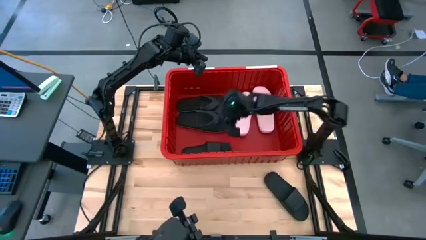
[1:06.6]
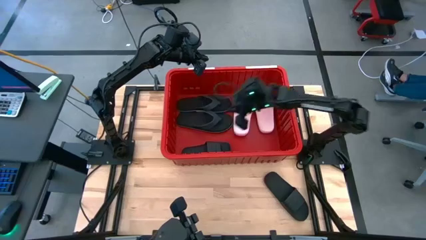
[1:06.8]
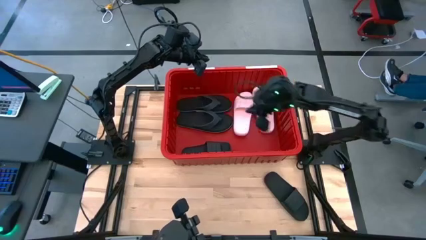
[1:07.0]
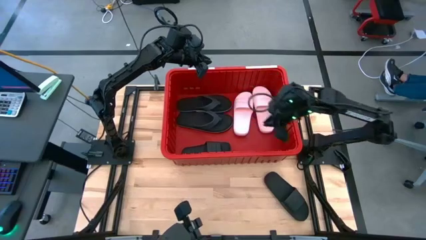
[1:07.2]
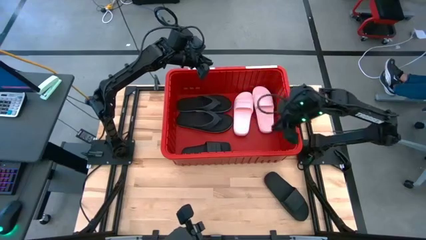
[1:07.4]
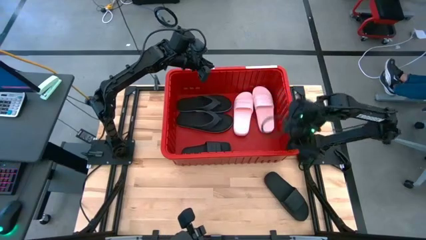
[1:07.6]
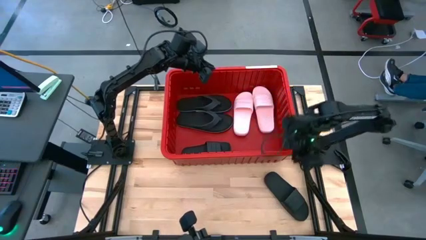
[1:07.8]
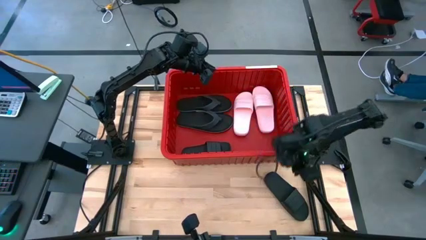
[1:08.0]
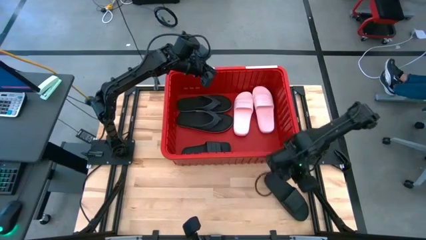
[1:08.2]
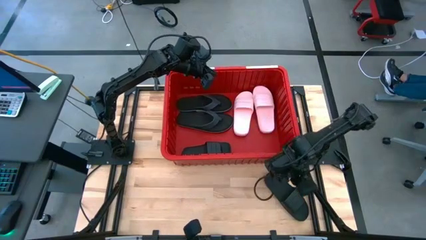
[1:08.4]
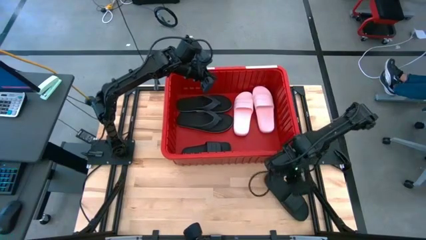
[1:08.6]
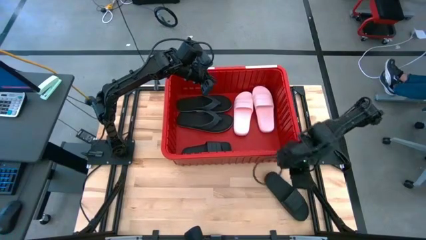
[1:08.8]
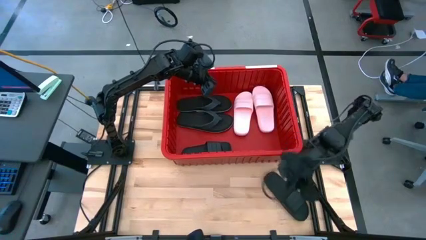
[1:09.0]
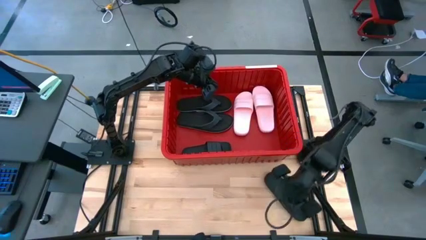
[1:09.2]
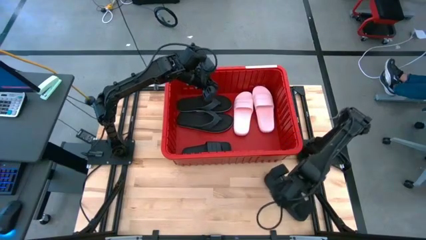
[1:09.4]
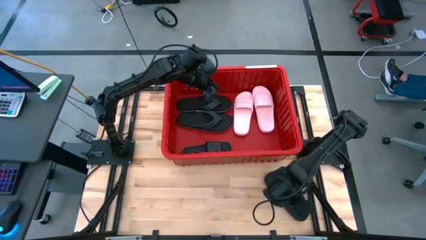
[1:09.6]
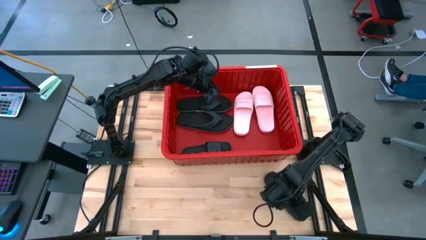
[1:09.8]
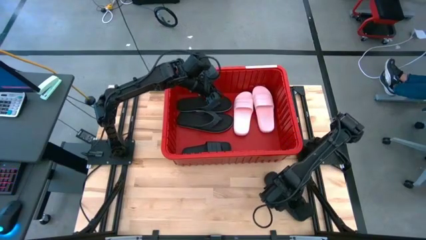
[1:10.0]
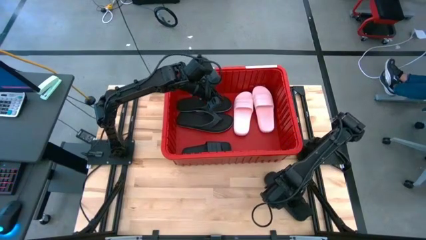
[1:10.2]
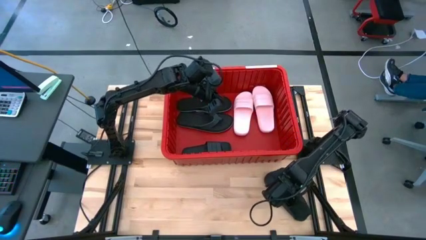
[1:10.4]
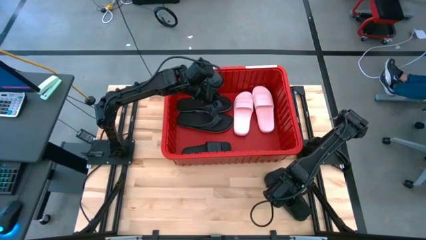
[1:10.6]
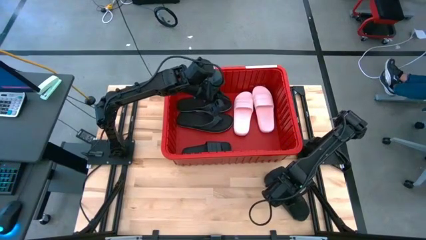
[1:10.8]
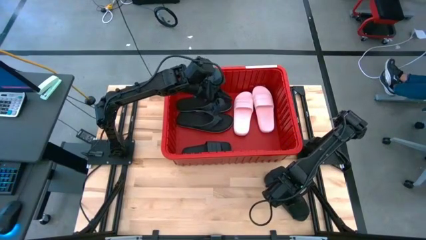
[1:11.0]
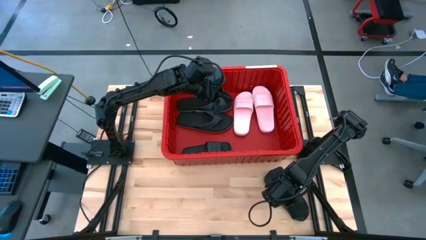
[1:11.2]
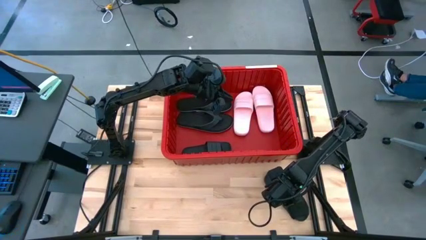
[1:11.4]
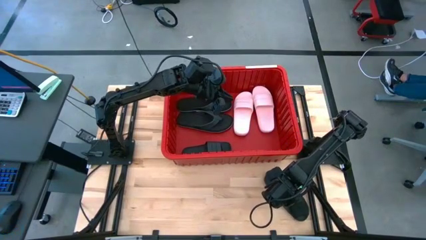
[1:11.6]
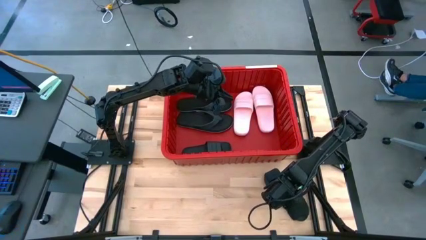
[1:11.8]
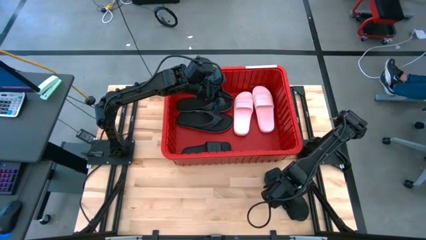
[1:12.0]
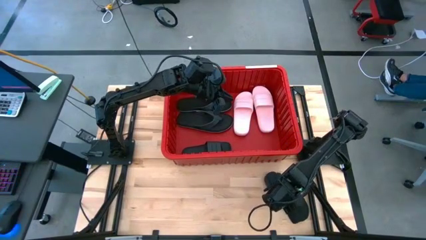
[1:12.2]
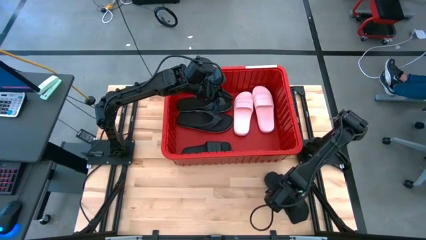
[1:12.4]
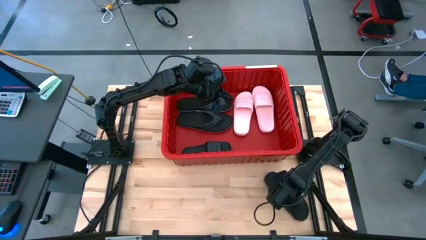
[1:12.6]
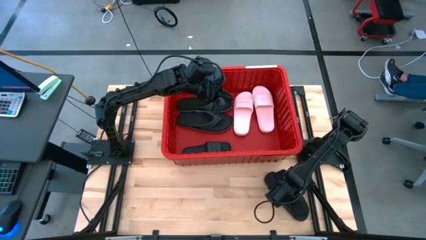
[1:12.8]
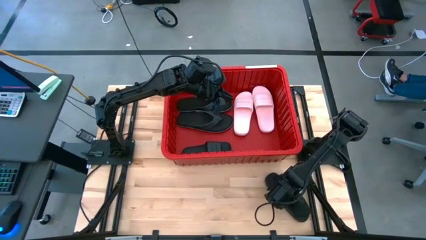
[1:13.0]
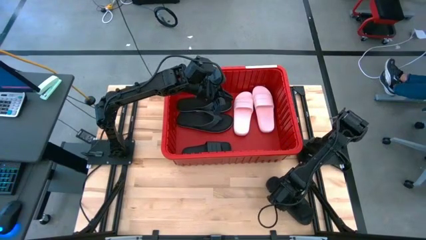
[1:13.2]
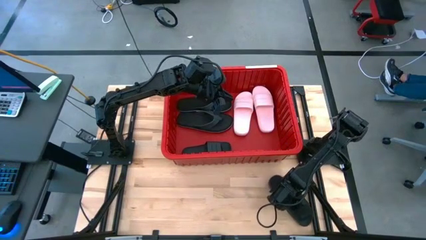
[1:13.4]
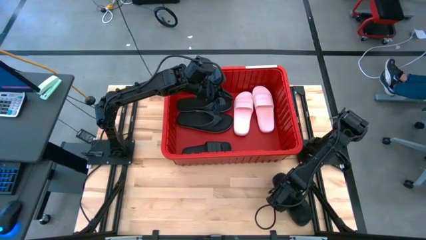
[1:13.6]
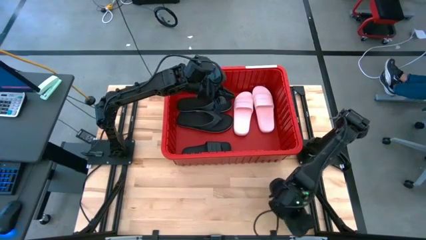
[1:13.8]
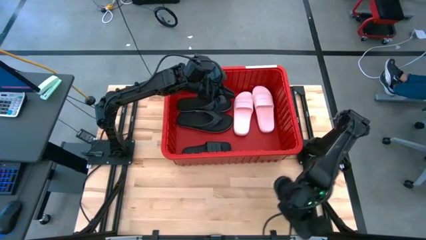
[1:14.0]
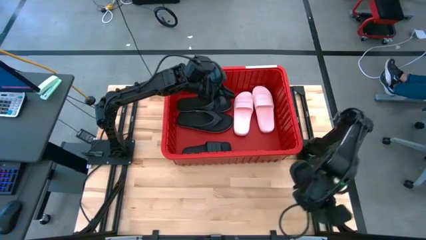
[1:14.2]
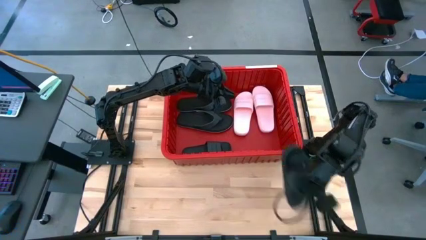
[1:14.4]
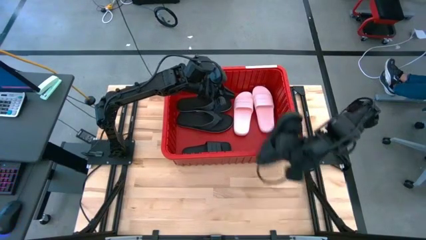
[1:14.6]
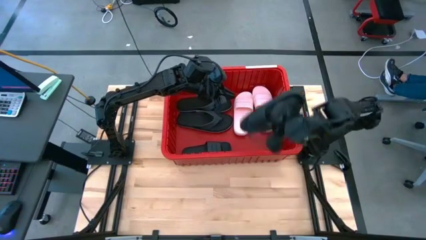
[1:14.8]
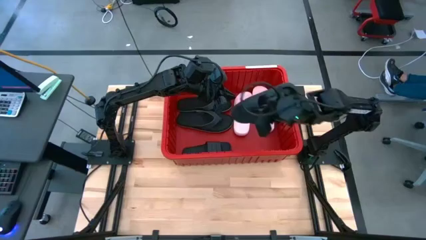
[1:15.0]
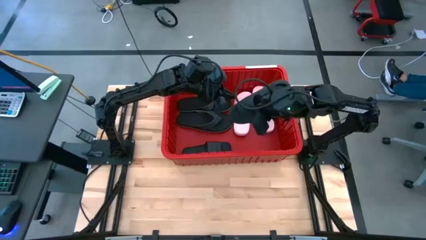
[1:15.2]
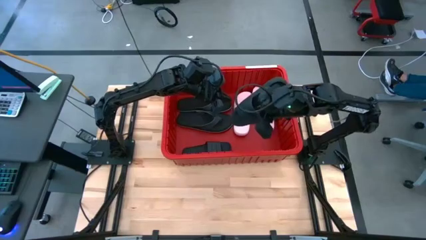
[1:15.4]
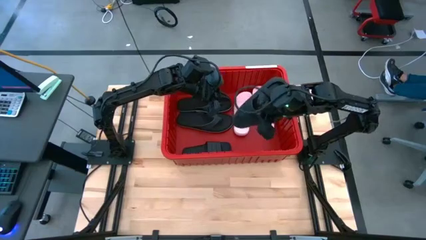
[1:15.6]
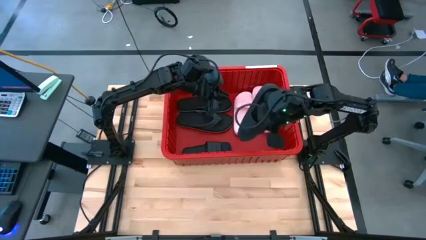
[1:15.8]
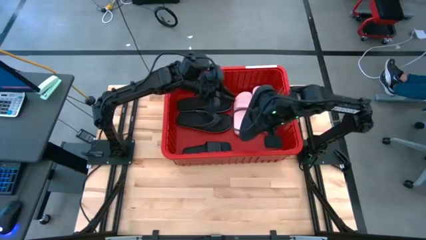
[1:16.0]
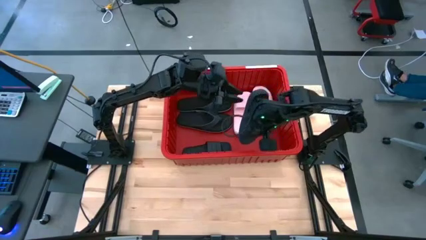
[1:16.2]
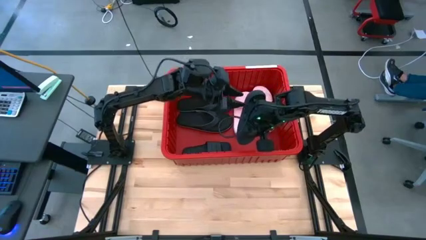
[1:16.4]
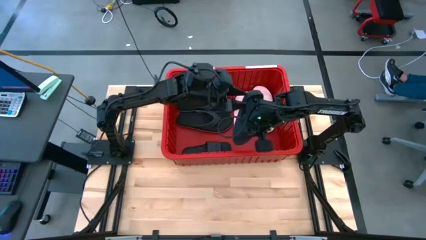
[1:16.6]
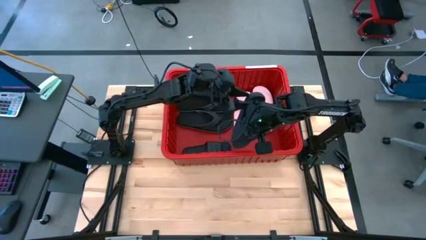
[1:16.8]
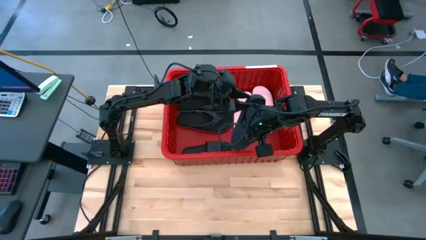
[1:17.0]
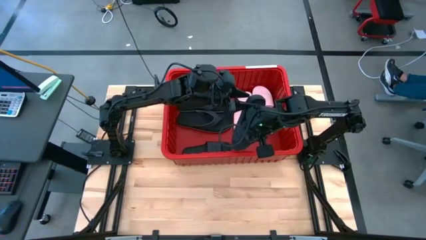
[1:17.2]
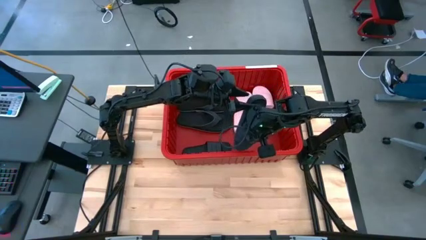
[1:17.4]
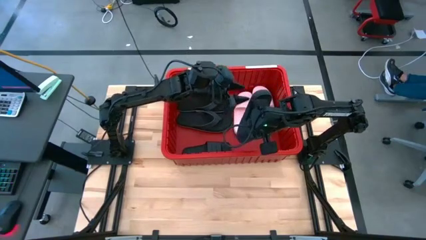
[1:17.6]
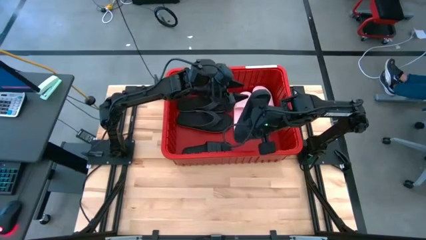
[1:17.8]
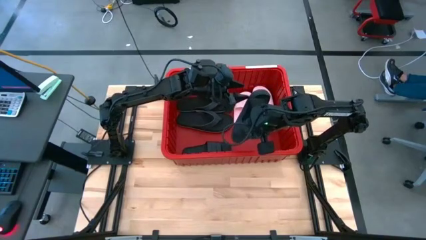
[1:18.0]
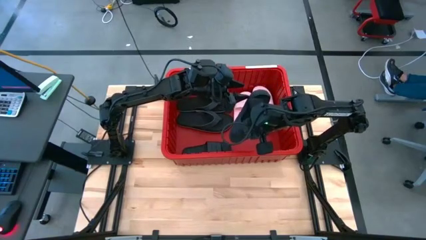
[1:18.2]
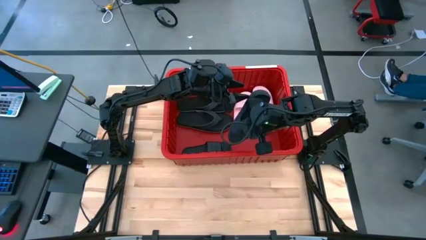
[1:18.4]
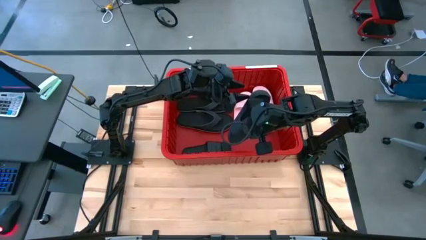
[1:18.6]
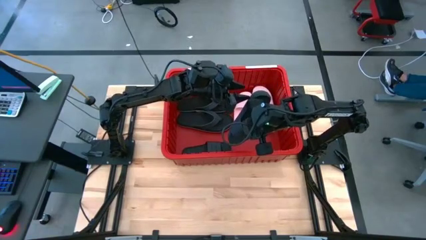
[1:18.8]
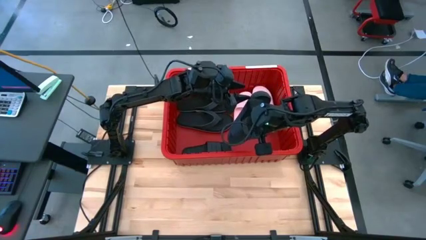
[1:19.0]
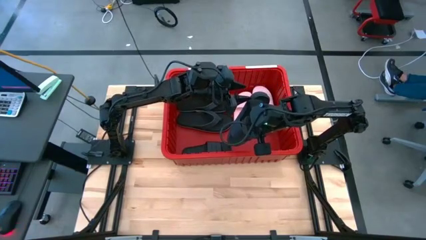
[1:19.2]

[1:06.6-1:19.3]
Task: Pick and place slides into bin
Put the other black pair slides into the bin

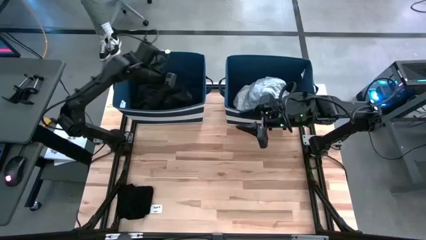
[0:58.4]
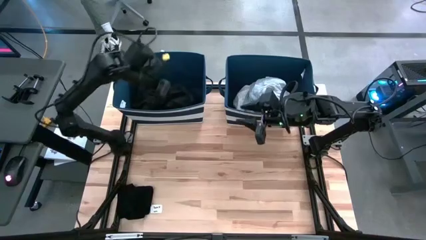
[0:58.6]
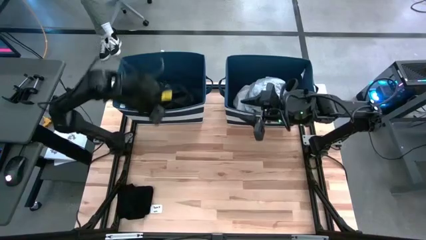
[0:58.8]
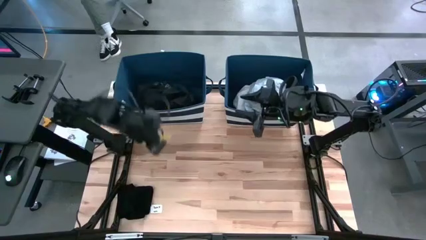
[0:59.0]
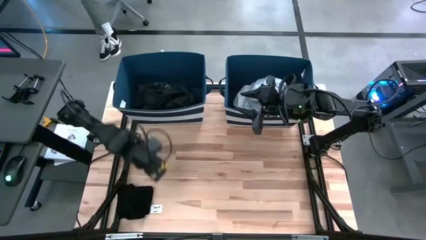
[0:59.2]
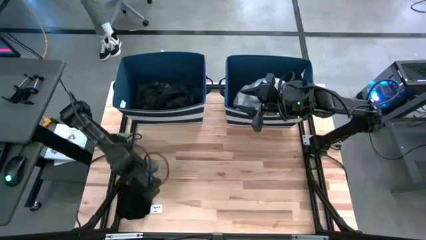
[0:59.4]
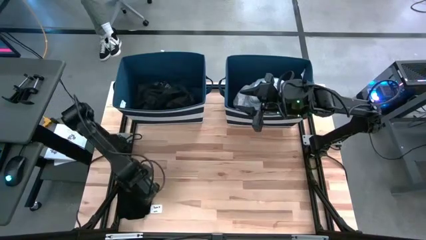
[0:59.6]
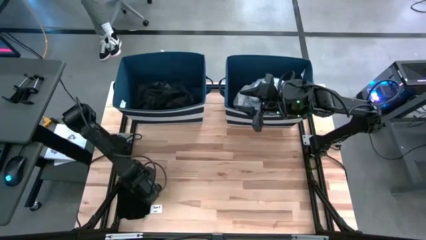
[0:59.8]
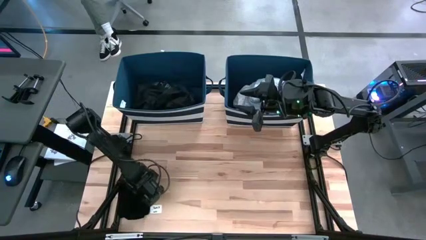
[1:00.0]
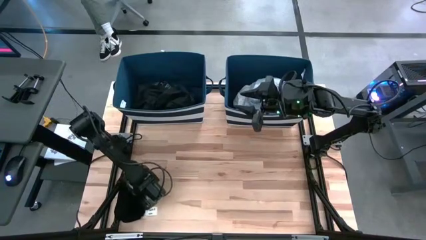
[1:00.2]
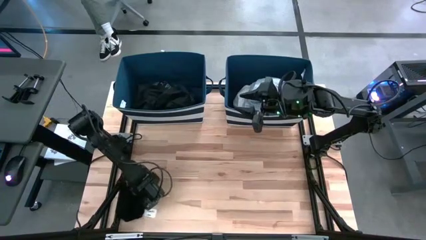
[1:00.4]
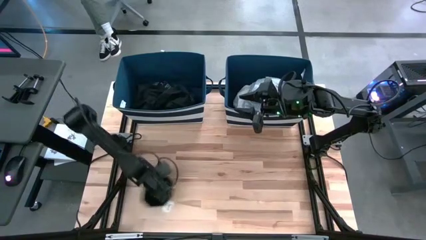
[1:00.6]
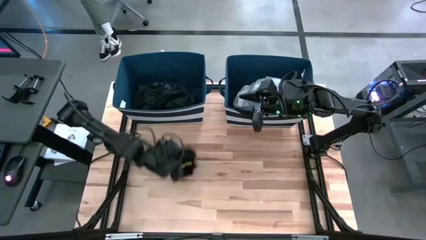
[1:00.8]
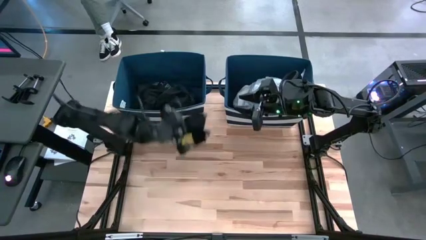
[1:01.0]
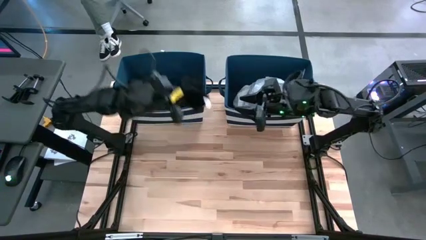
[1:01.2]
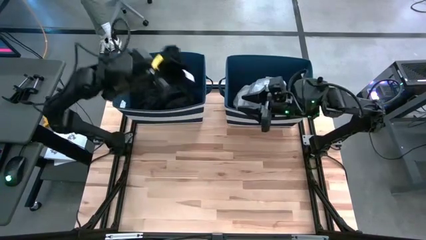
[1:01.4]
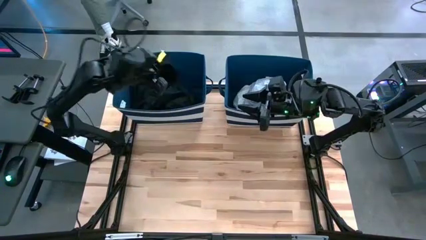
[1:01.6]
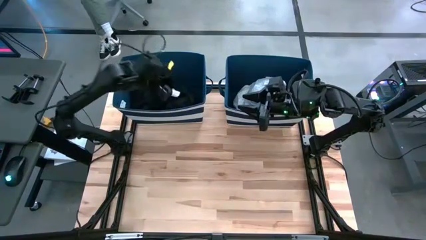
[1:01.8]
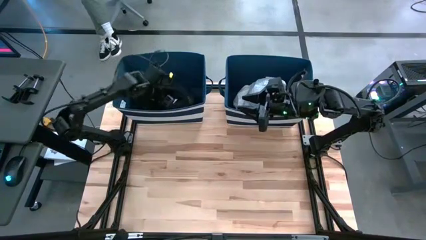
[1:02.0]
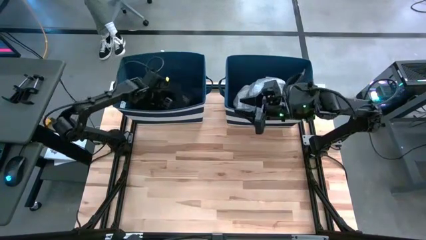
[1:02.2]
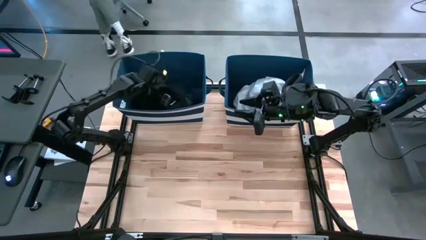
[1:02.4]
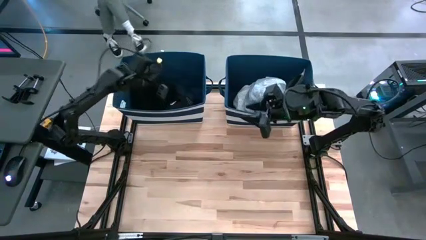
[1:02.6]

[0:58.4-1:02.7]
Task: Sort clothes
Put the black underwear into the left blue laundry bin
